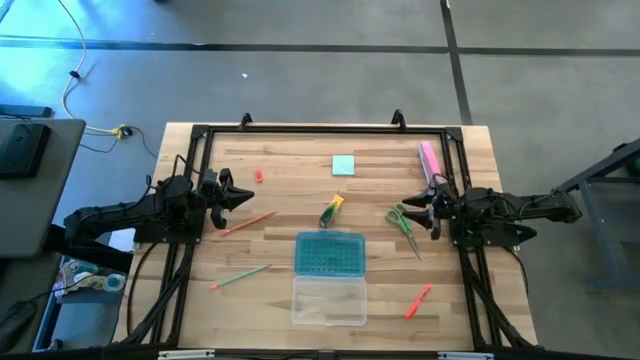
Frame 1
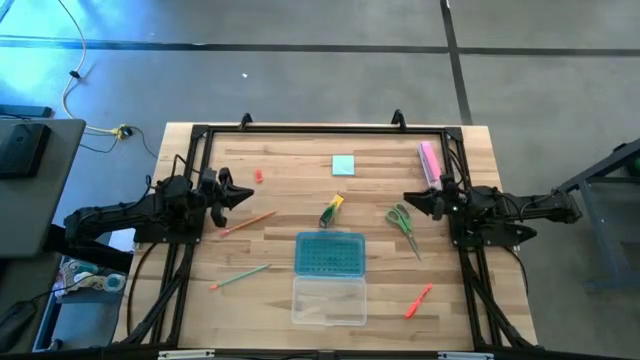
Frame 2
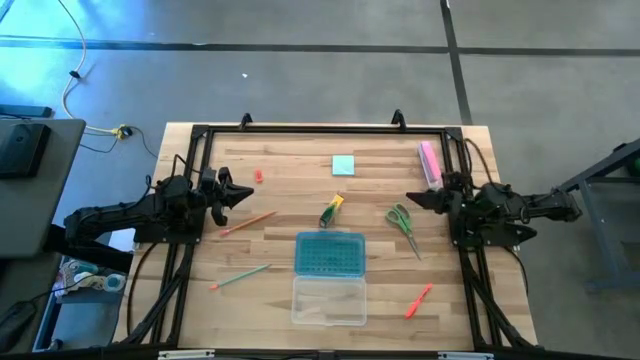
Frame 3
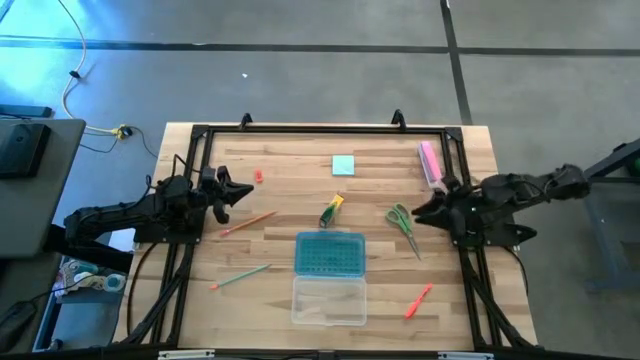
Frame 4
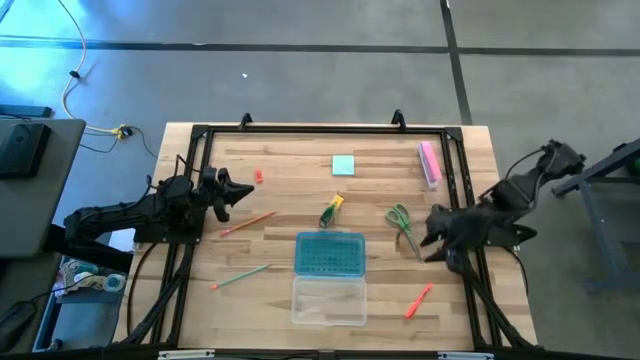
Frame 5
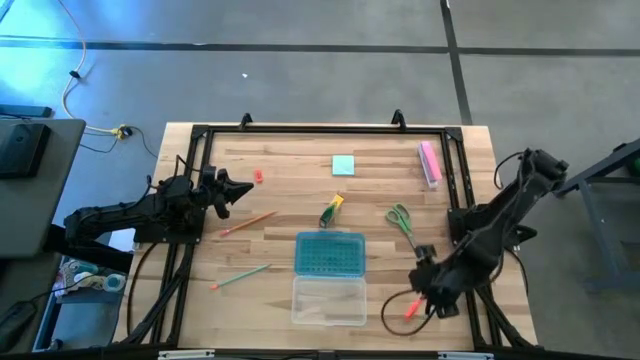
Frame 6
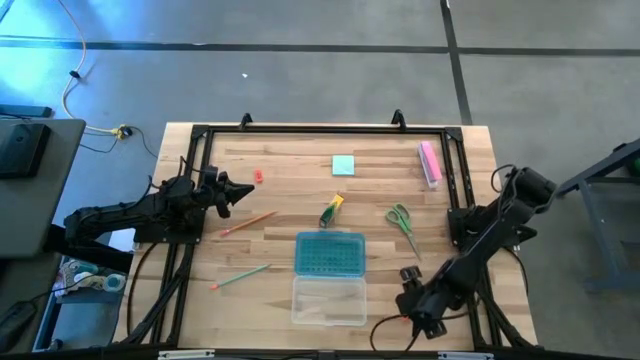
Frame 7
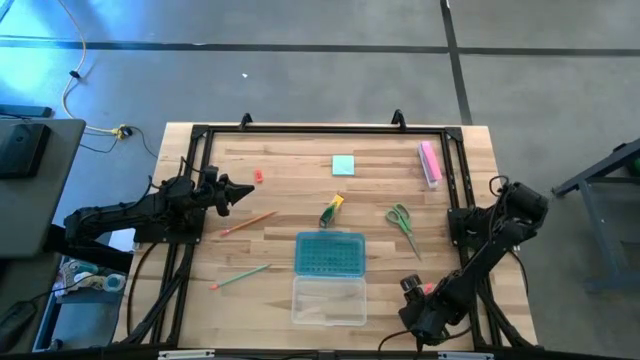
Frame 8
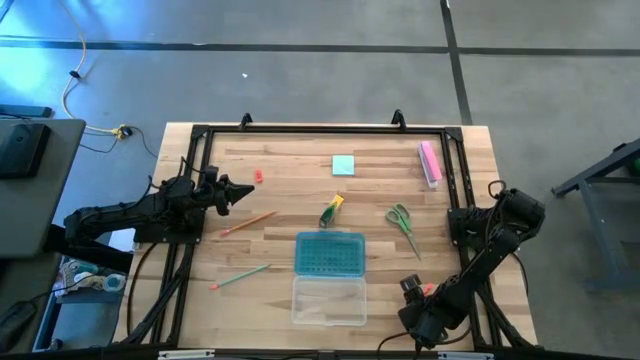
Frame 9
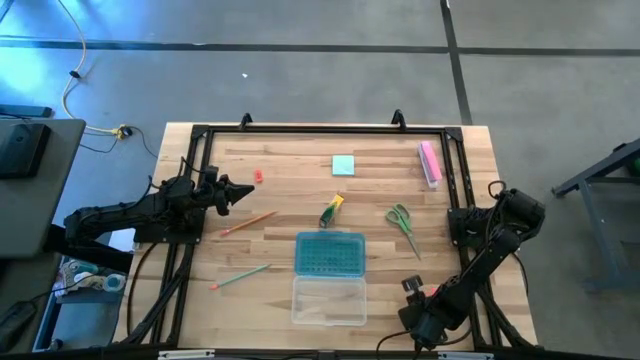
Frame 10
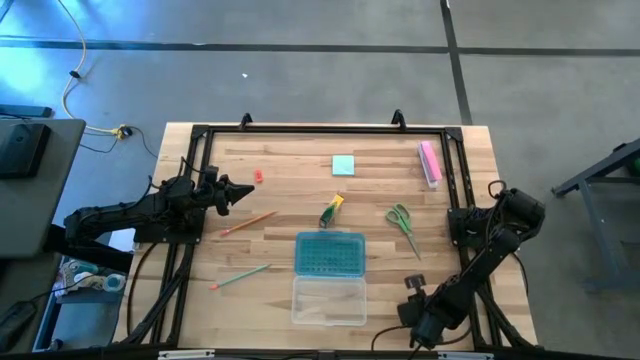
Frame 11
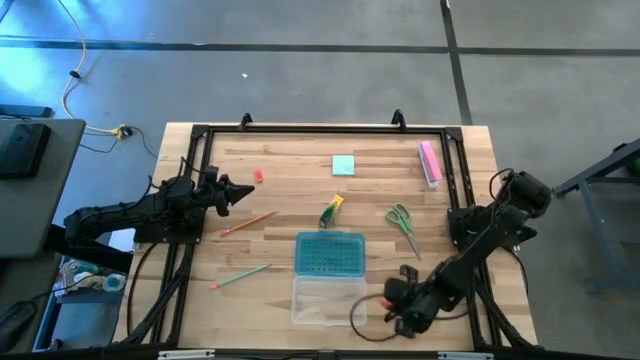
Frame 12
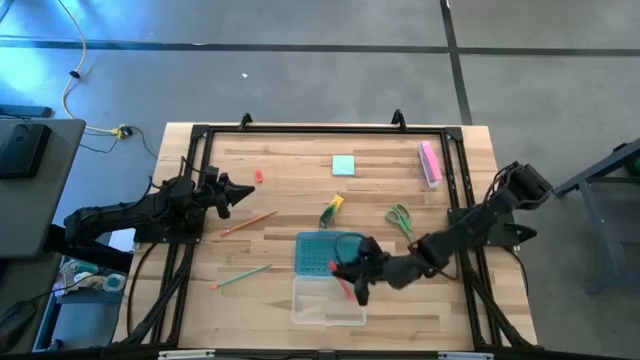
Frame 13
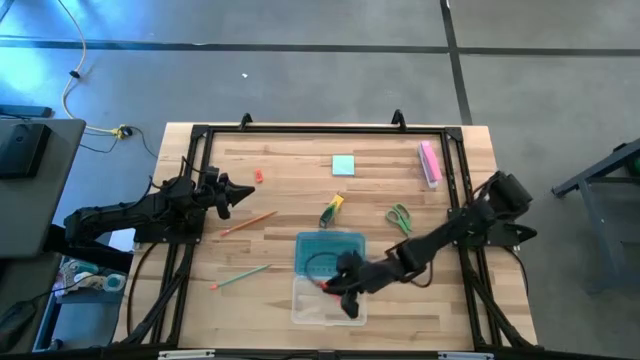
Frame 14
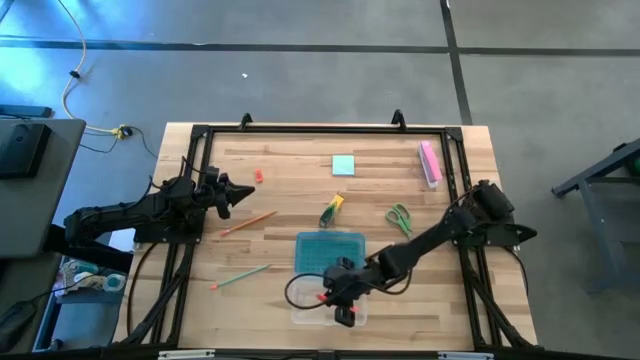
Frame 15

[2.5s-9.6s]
Task: Pack school essentials
Put the orange pen into the supply box

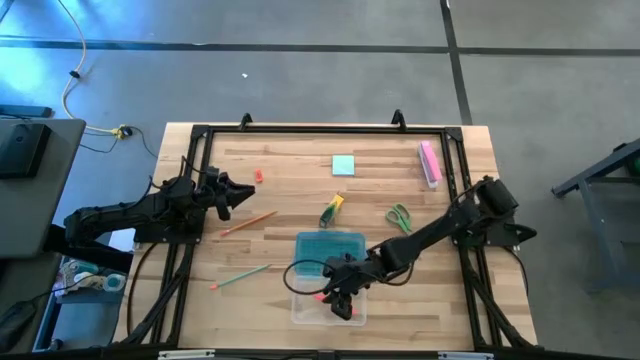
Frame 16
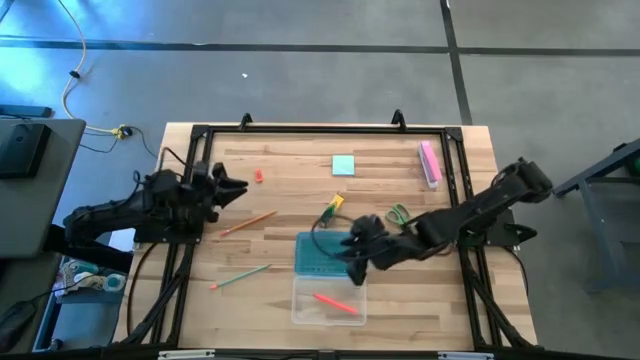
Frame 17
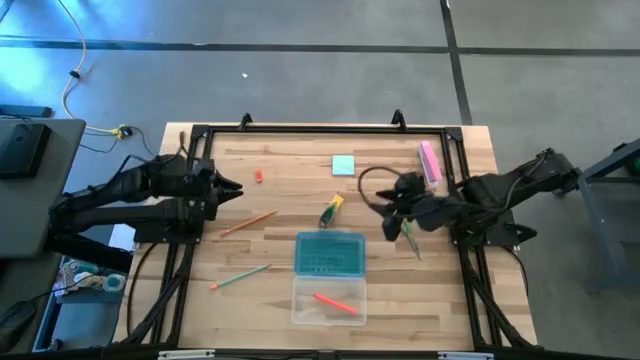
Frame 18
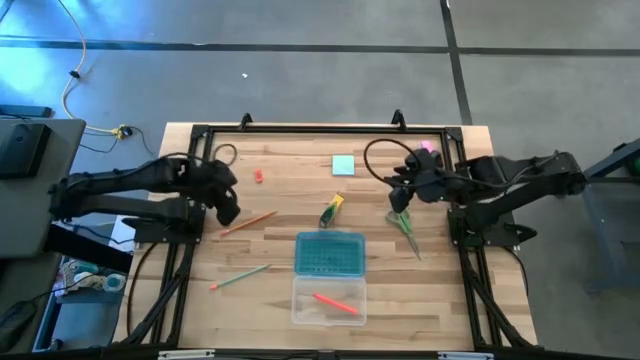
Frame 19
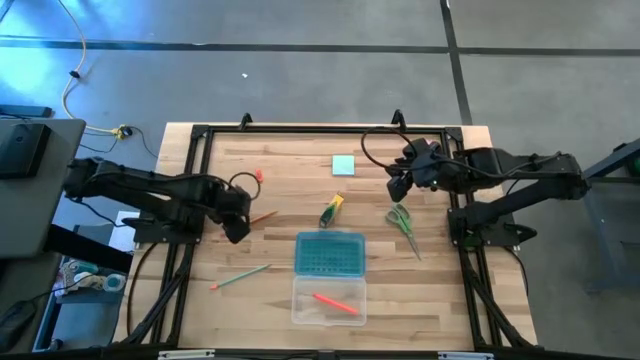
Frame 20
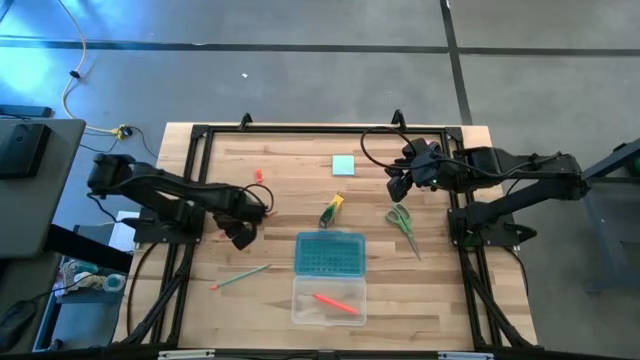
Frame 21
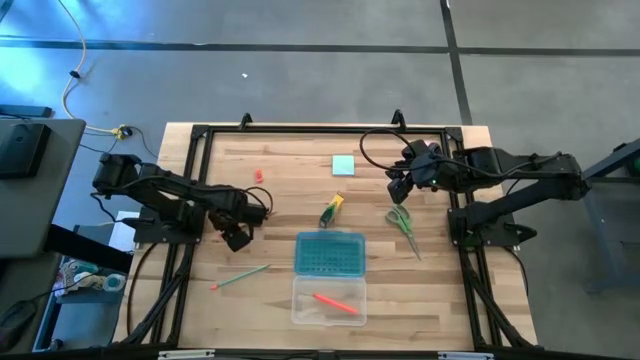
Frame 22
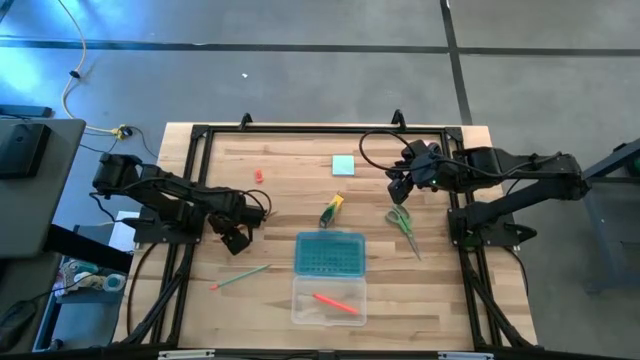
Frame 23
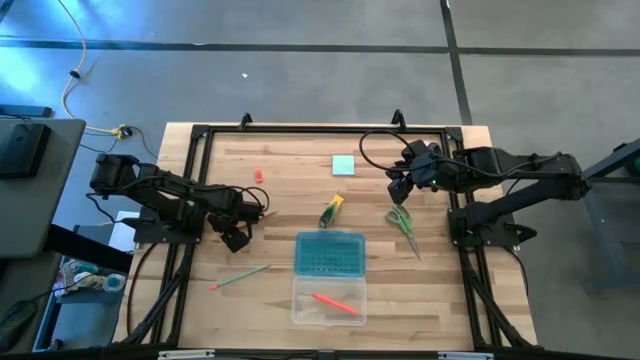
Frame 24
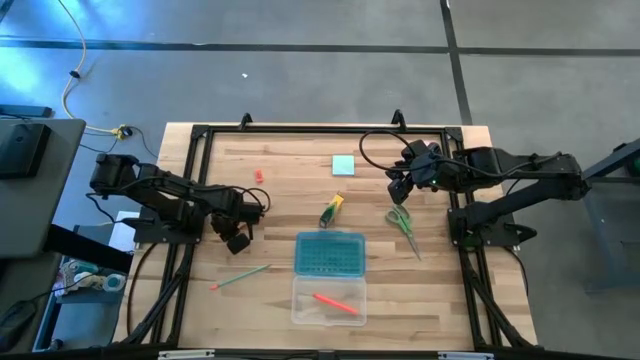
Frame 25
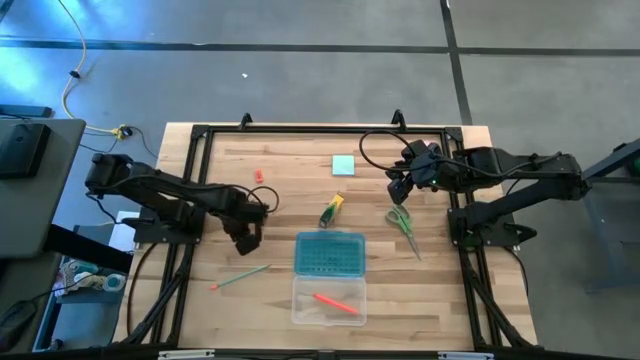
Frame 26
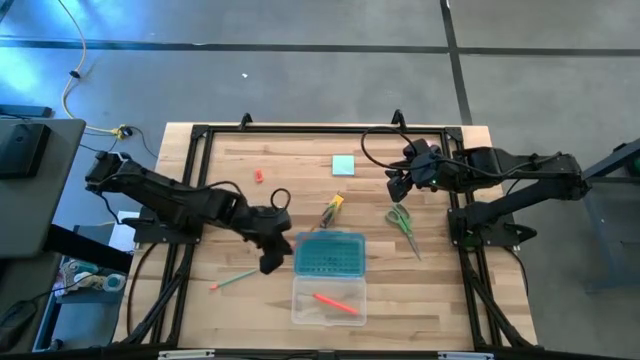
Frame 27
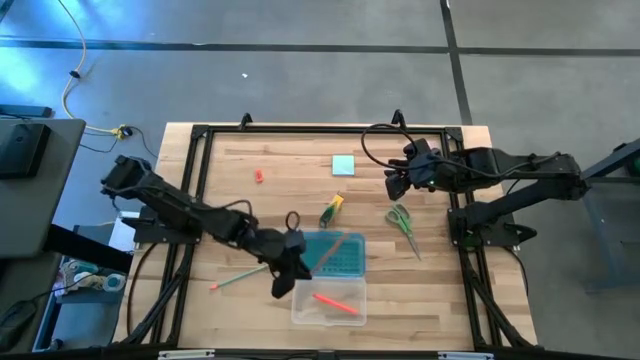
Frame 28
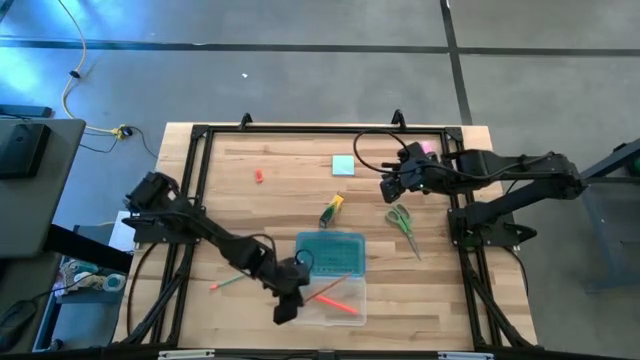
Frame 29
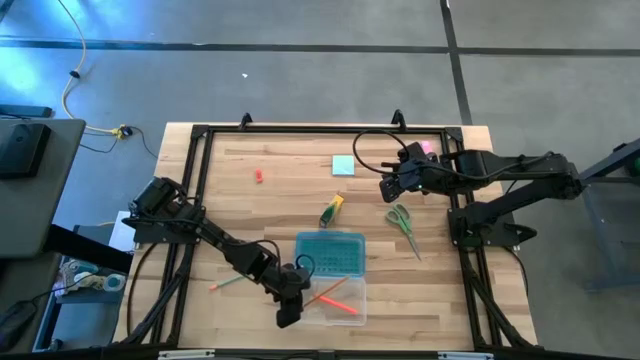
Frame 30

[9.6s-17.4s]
Put the orange pencil into the supply box

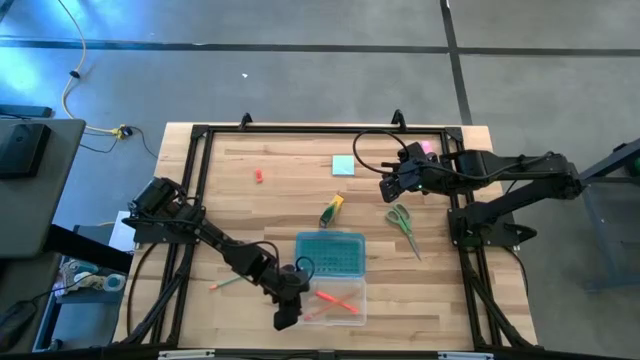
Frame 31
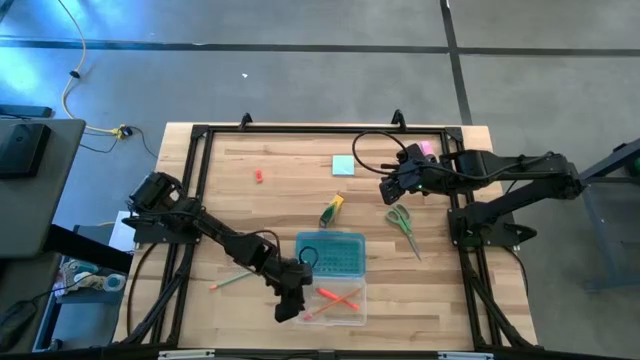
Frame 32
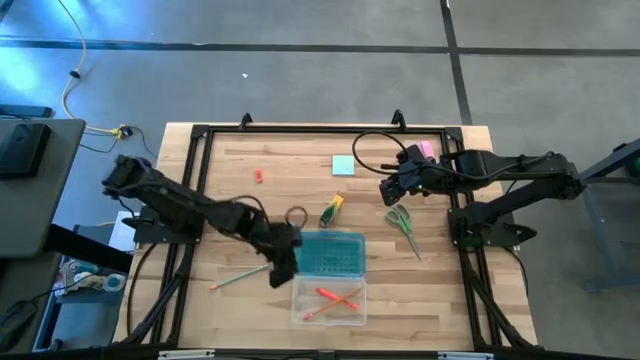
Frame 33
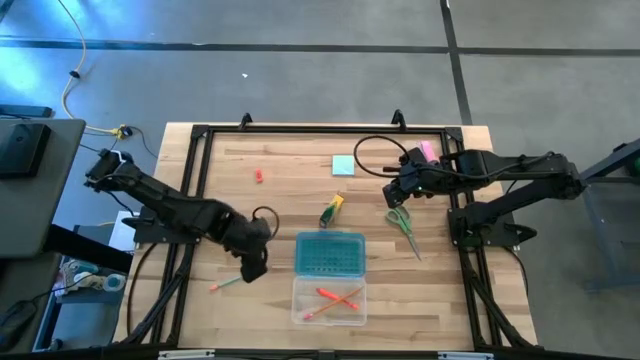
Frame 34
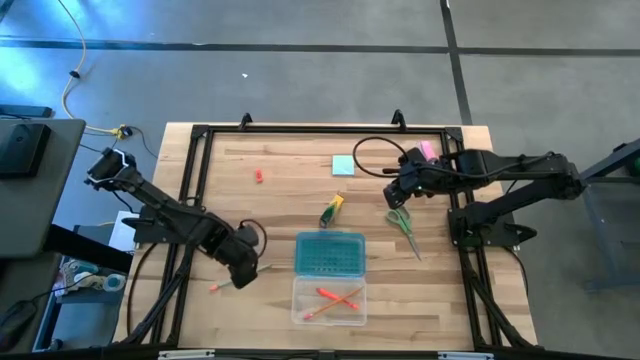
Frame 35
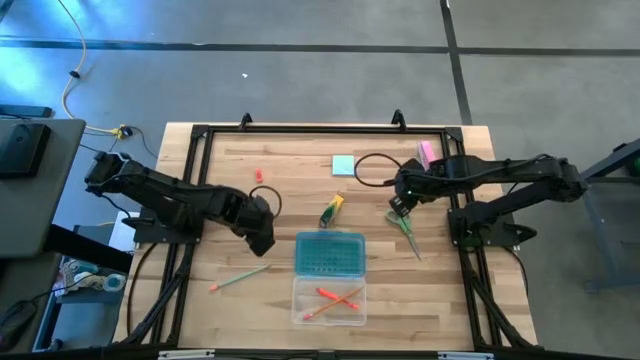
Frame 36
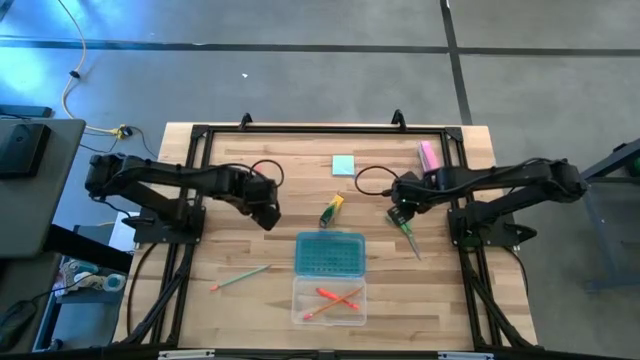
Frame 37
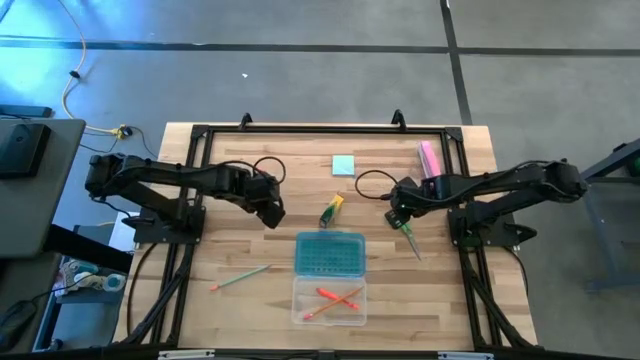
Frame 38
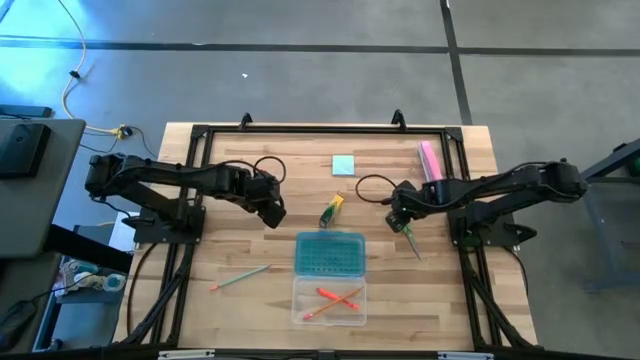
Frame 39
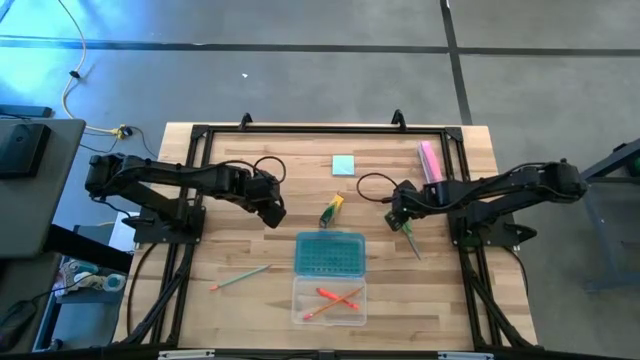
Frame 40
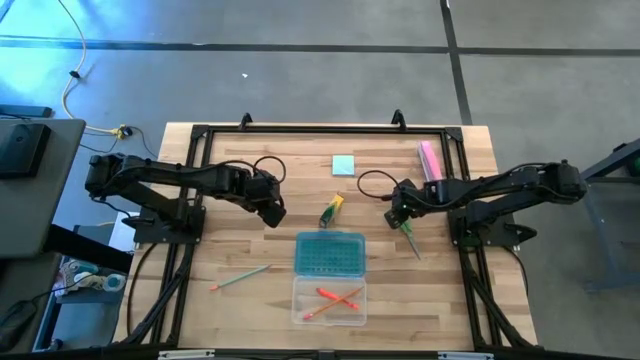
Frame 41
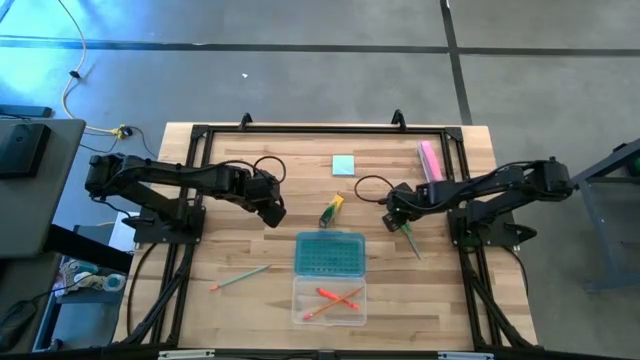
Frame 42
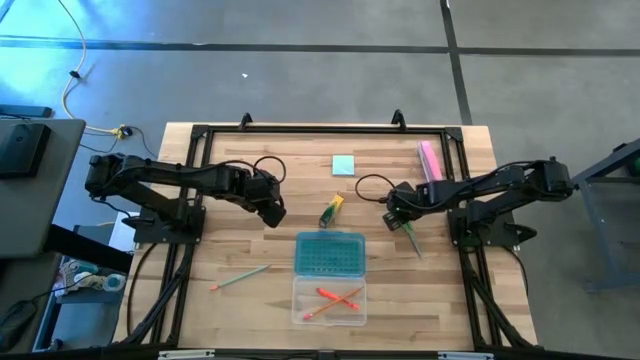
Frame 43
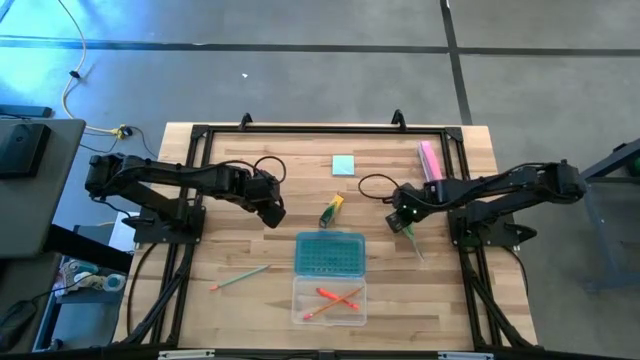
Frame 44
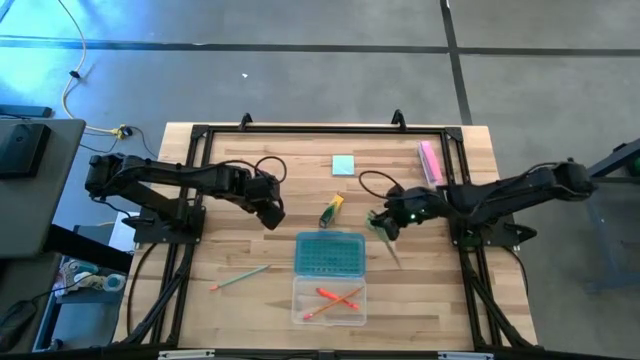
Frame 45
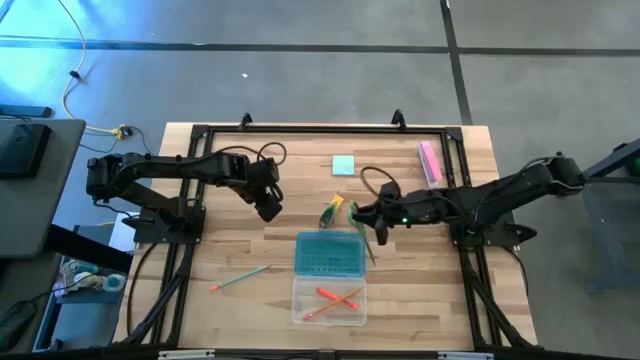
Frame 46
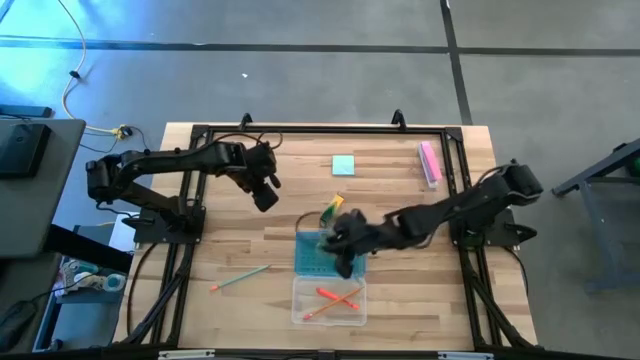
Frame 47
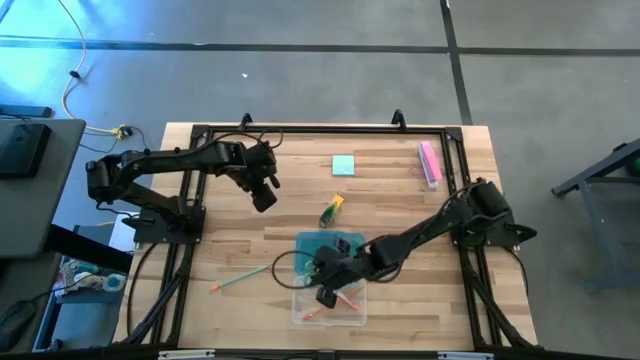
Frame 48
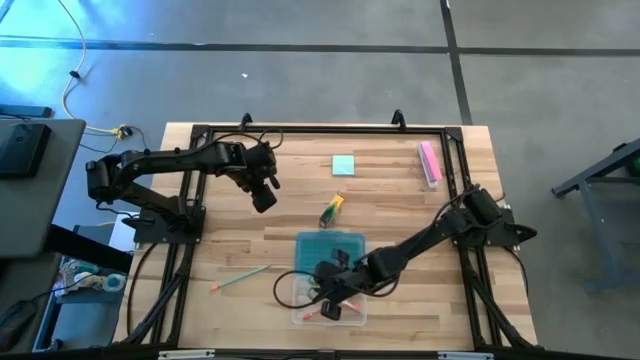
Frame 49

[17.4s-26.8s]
Put the green scissors into the supply box
